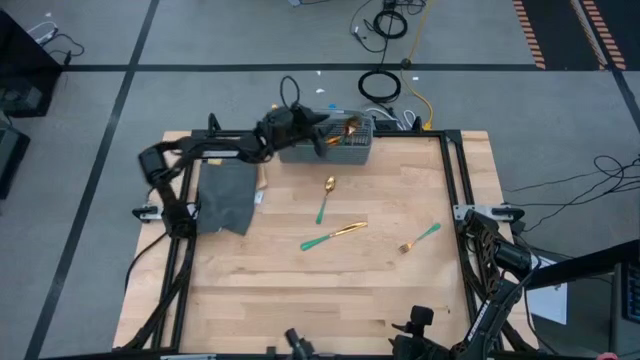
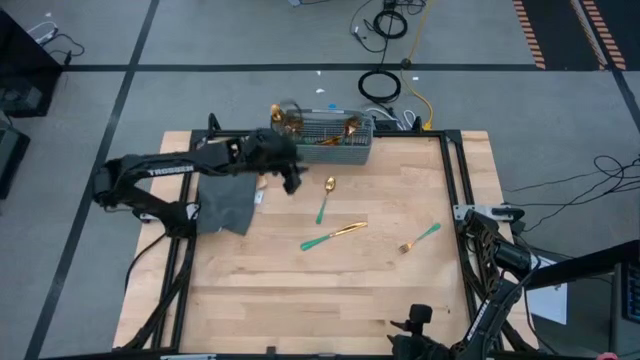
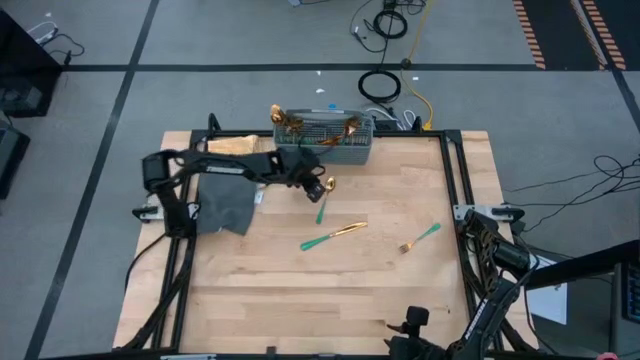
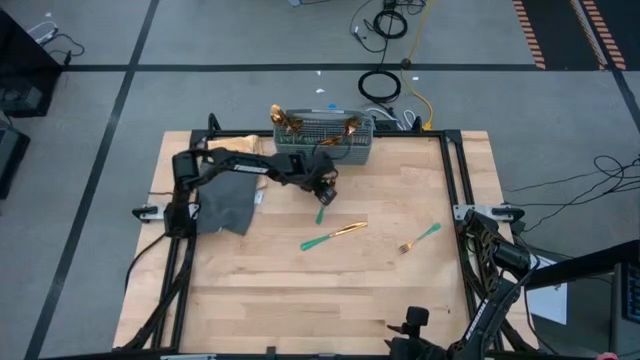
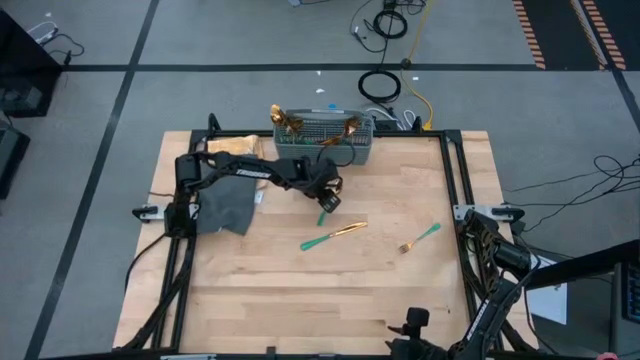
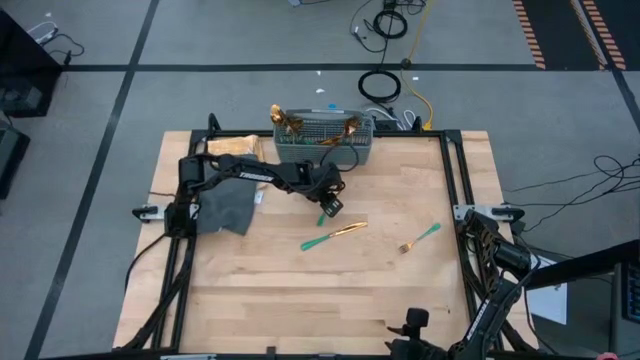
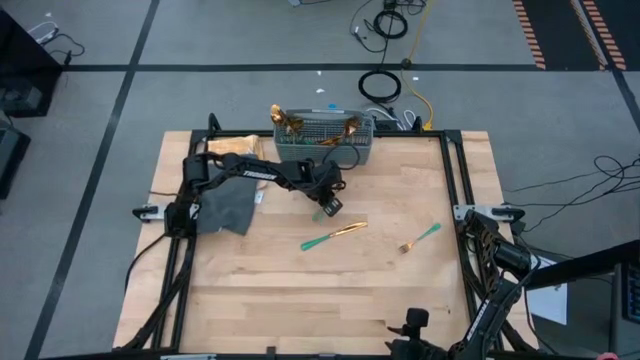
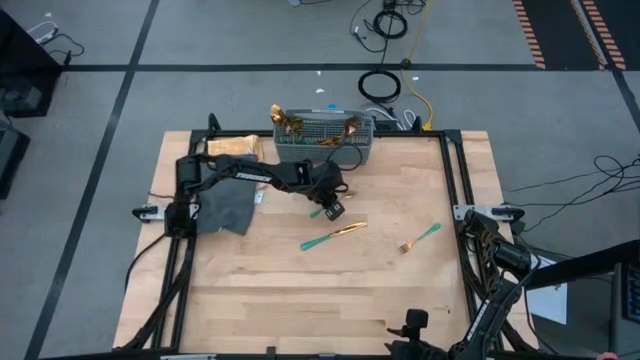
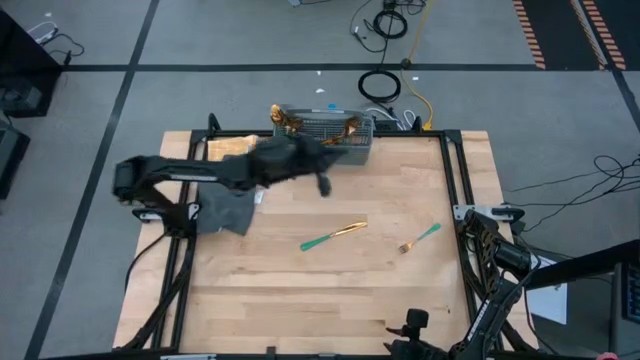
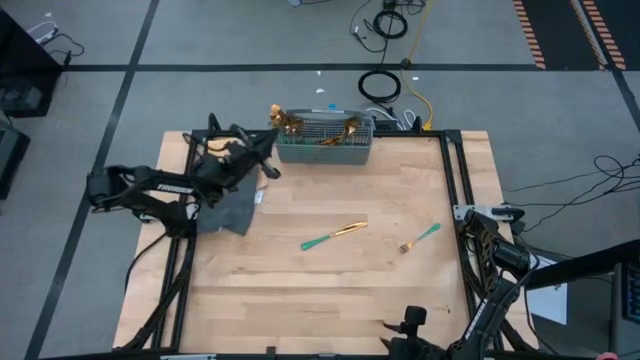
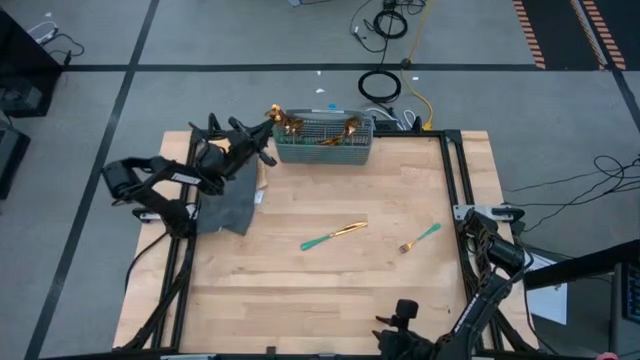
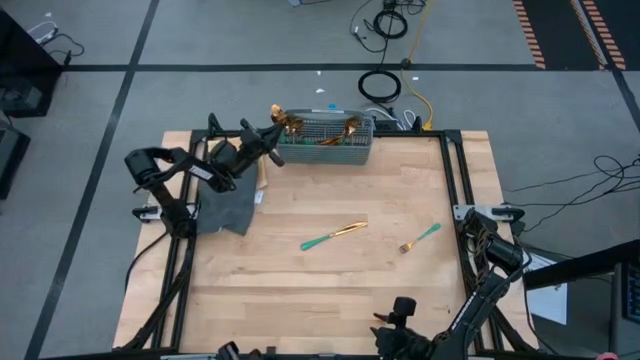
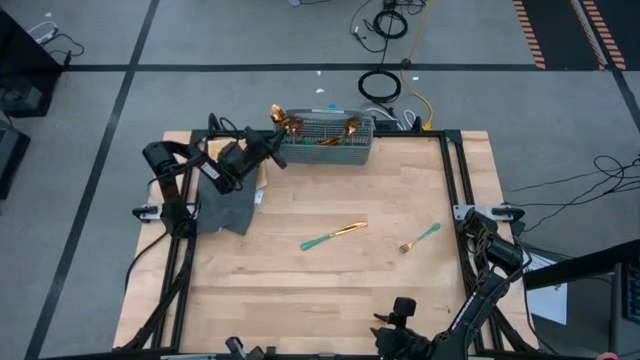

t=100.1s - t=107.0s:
Task: Sort silverware
Put the green spoon into the silverware basket

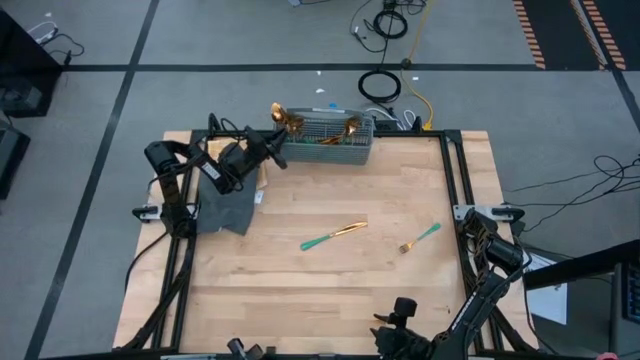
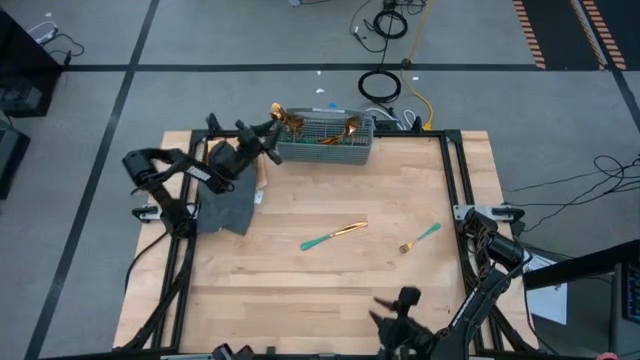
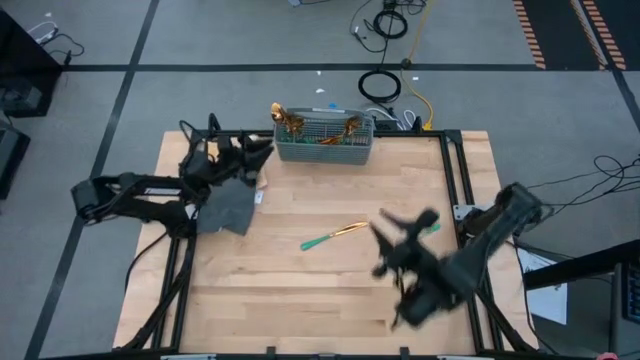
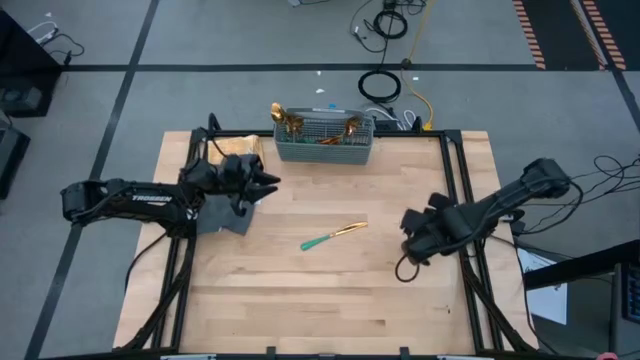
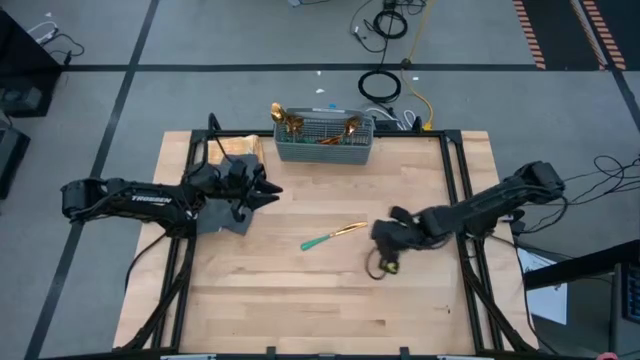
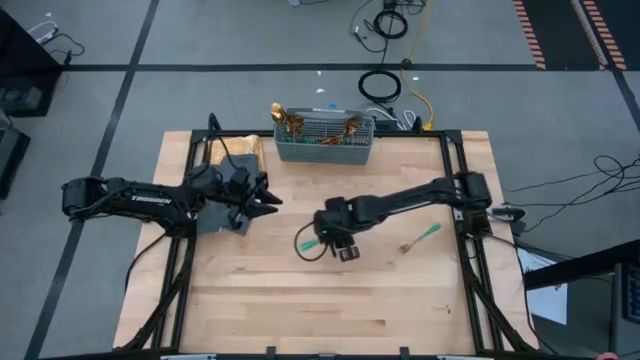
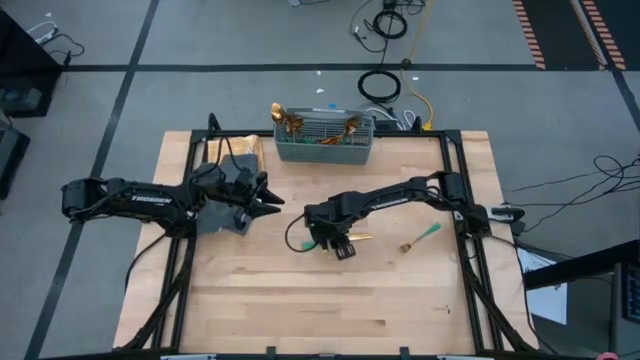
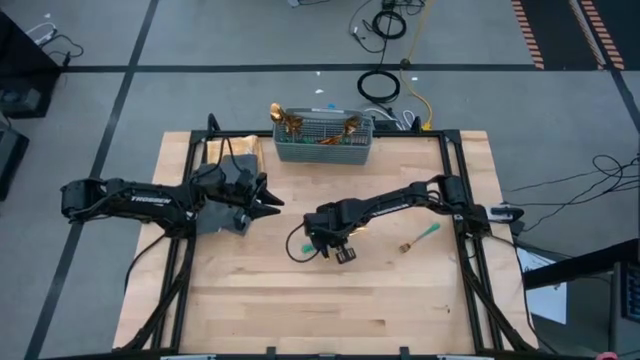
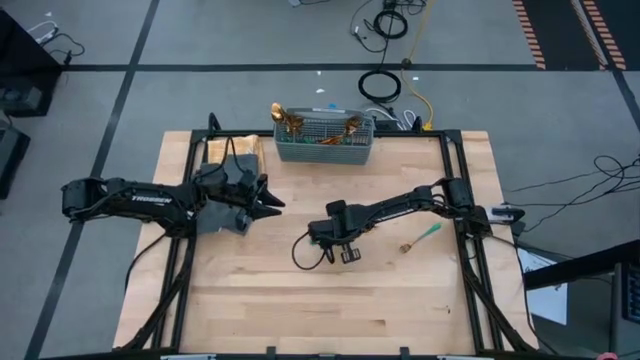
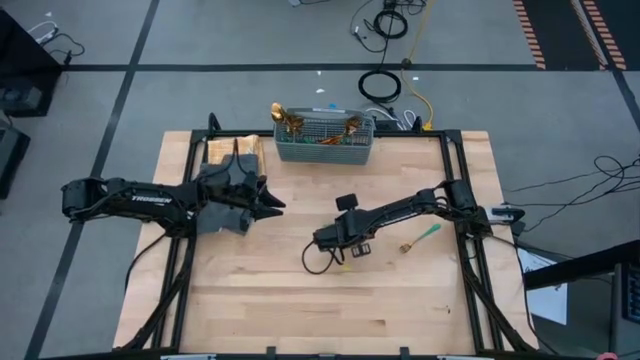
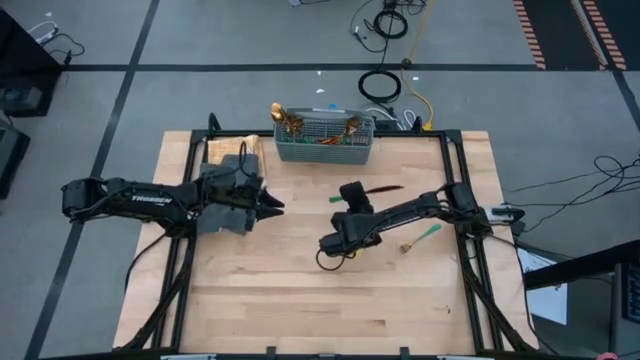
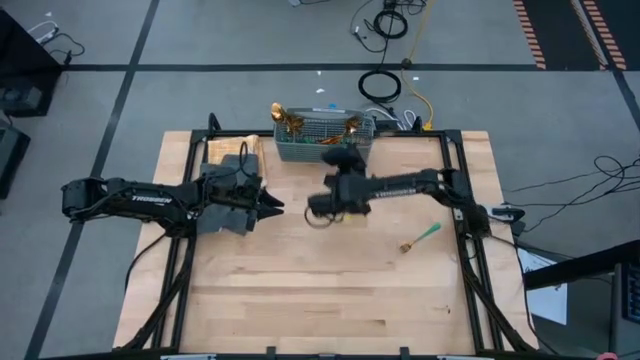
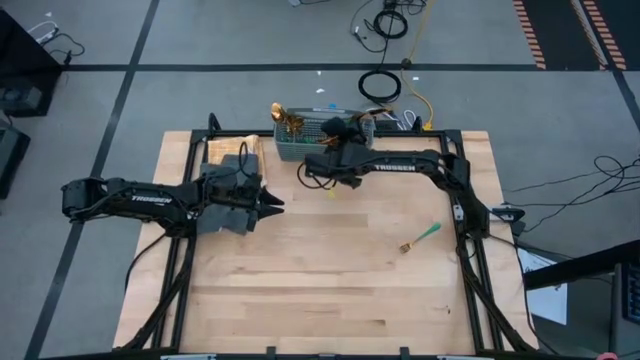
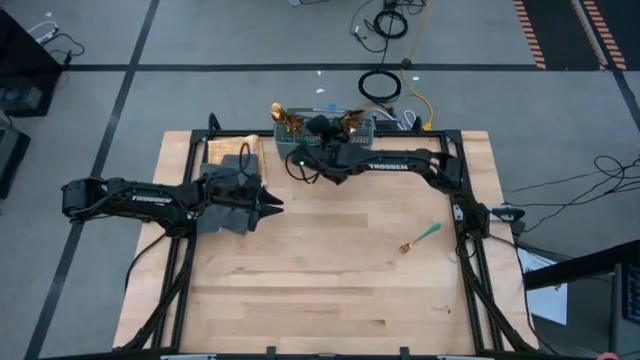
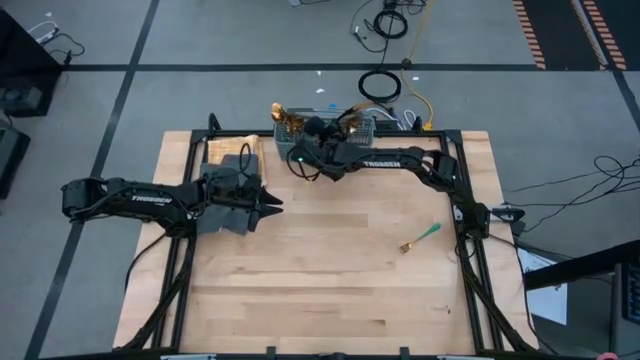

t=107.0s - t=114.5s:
Put the green table knife into the silverware basket

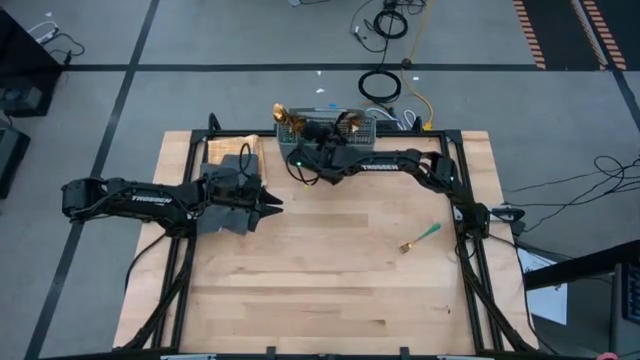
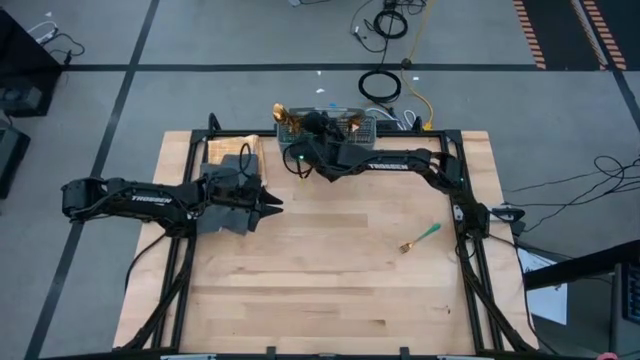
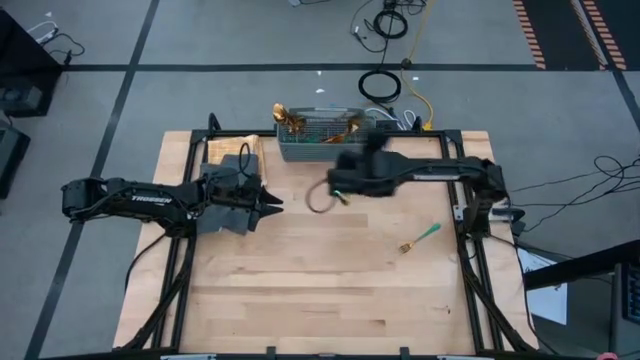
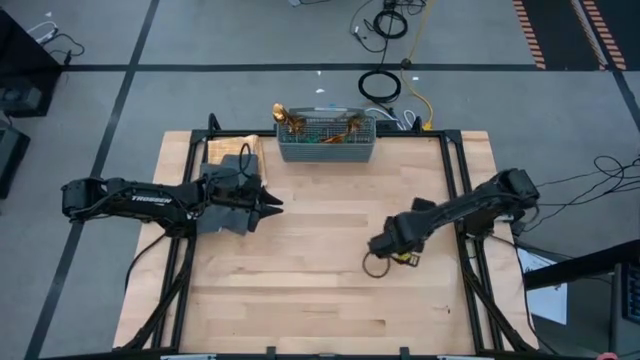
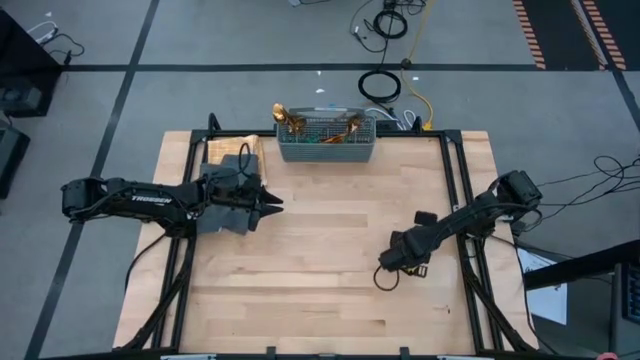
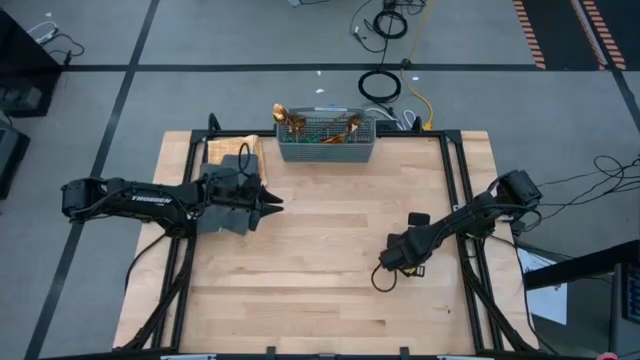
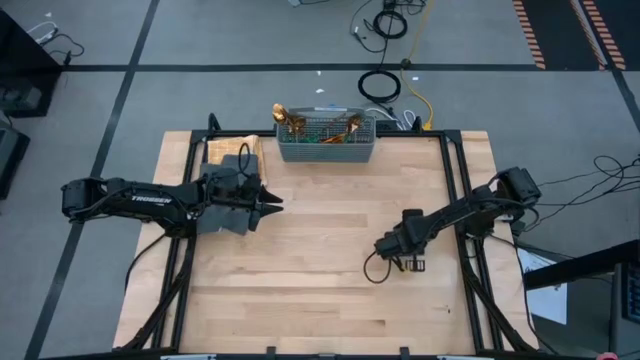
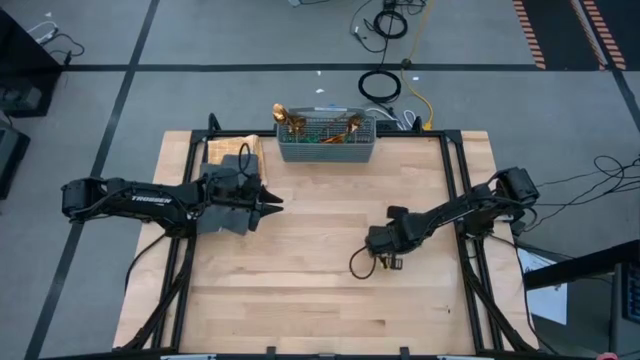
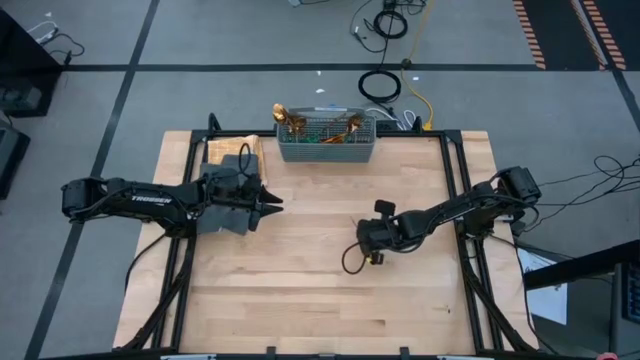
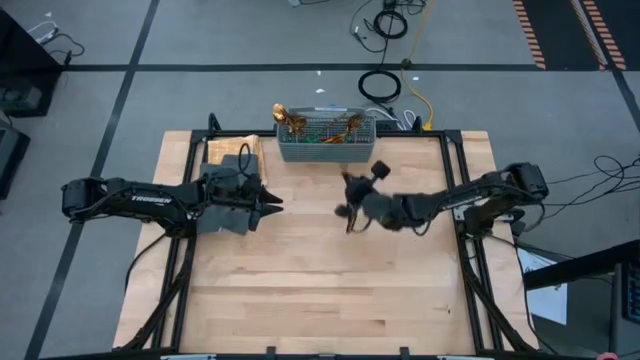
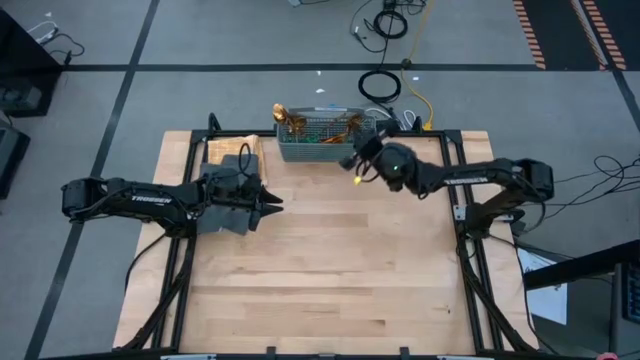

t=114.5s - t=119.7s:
Put the green fork into the silverware basket

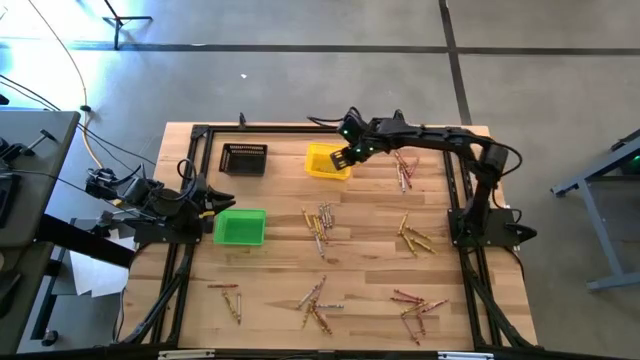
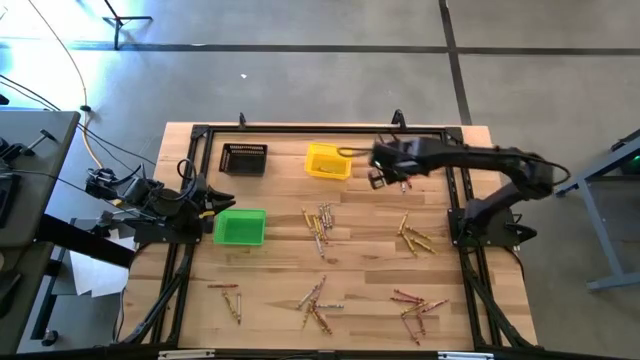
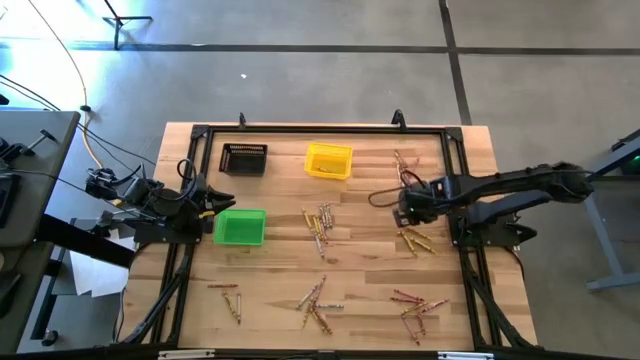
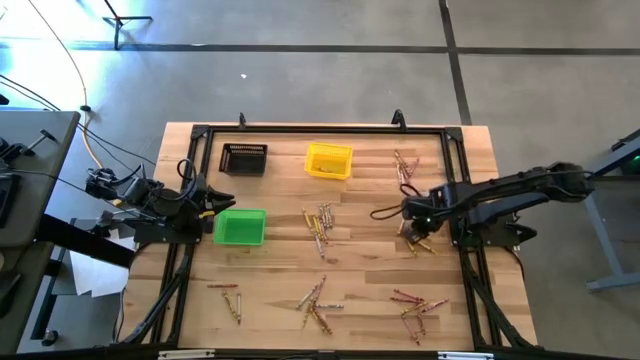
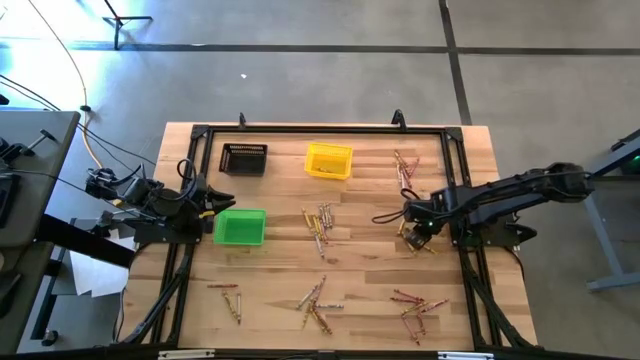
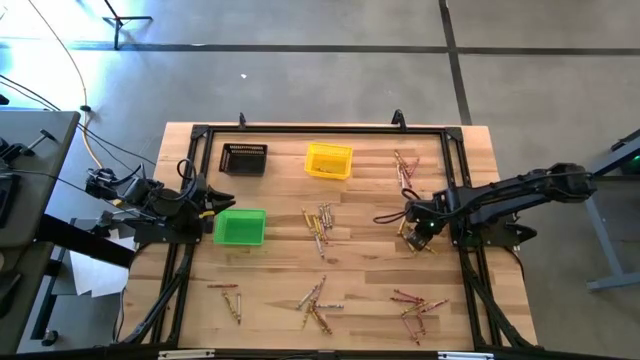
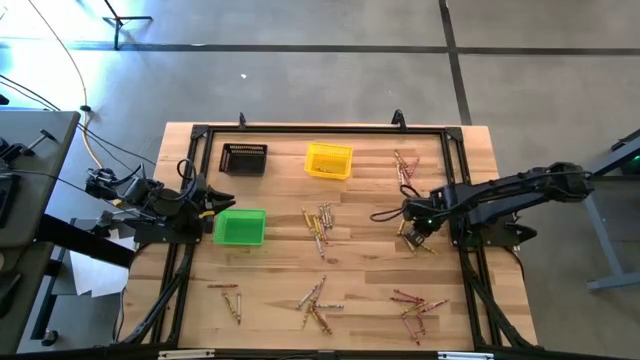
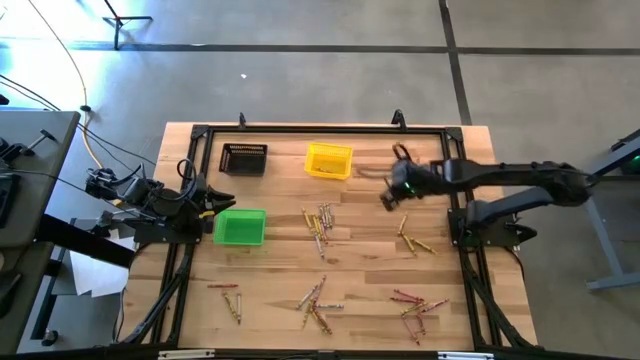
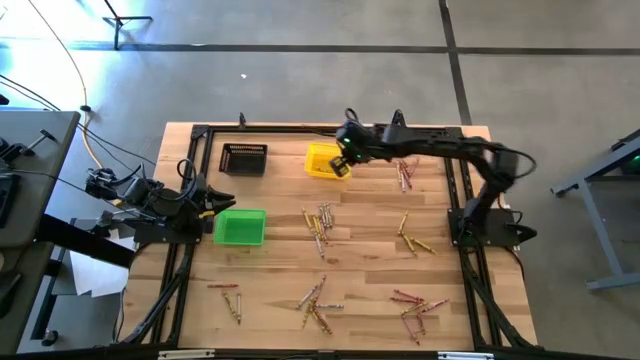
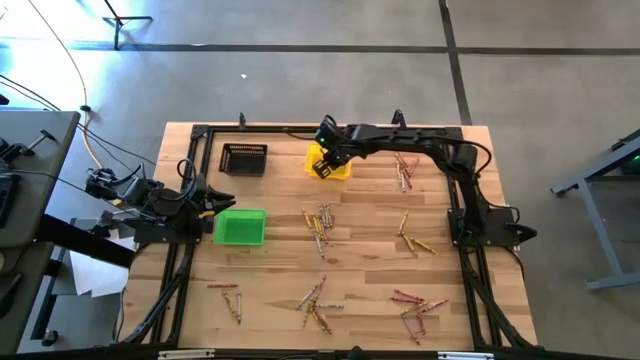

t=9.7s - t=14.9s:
Task: Sort crayons
Put the yellow crayon into the yellow bin
